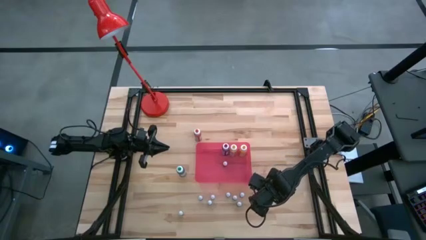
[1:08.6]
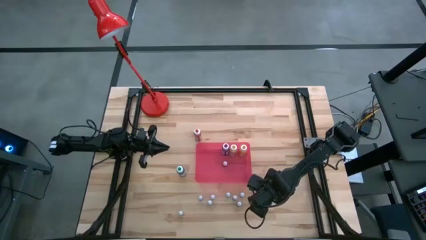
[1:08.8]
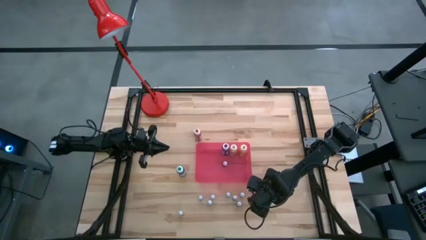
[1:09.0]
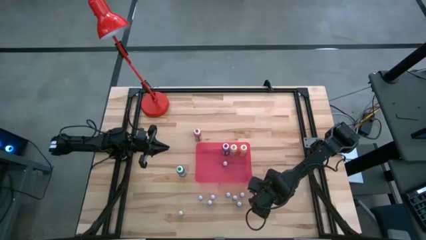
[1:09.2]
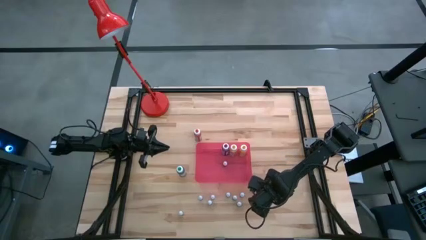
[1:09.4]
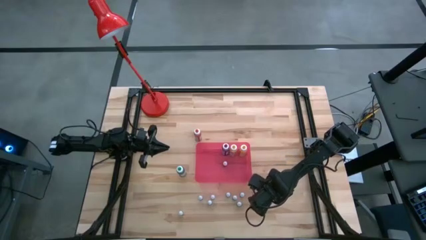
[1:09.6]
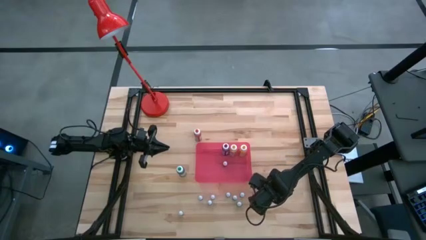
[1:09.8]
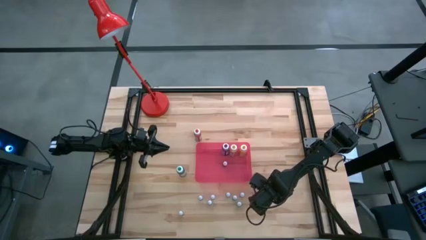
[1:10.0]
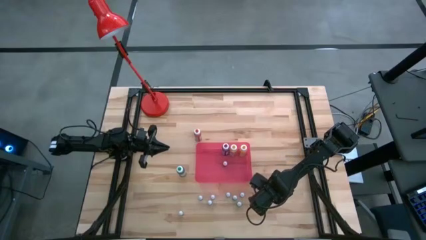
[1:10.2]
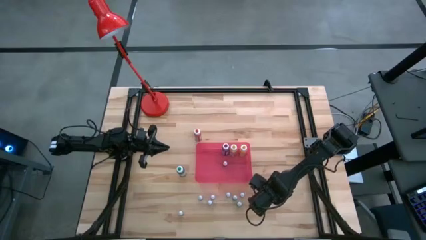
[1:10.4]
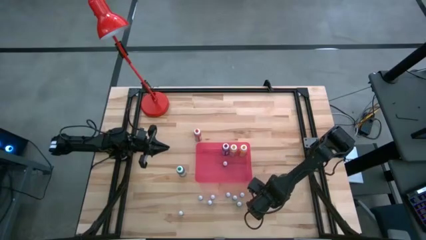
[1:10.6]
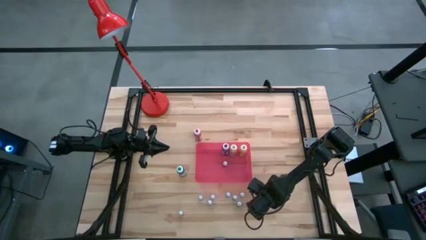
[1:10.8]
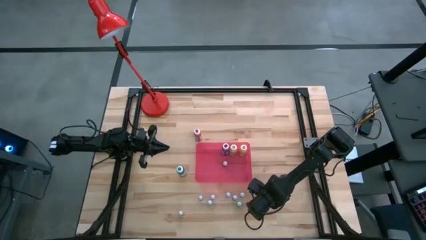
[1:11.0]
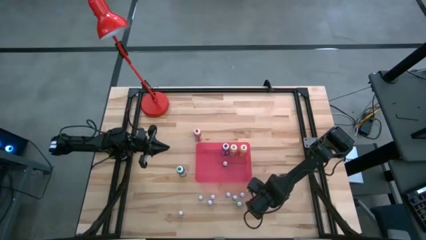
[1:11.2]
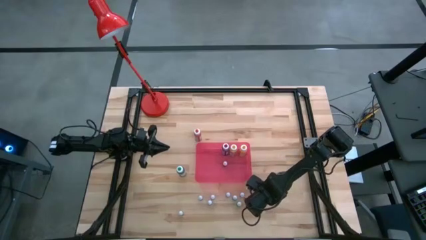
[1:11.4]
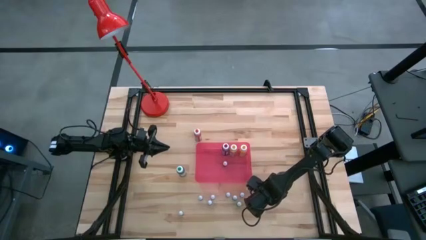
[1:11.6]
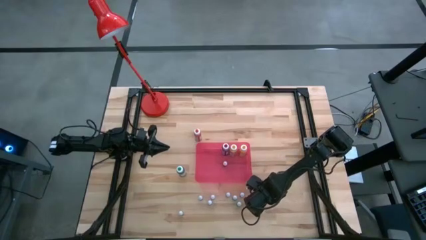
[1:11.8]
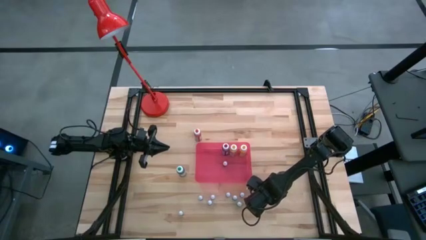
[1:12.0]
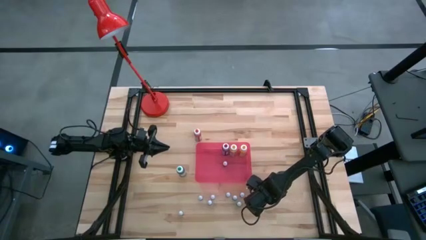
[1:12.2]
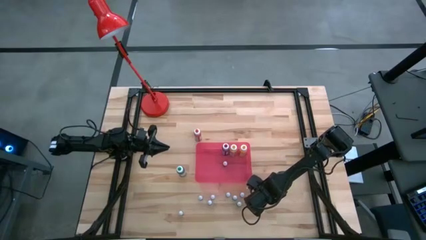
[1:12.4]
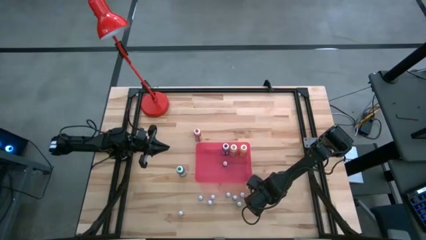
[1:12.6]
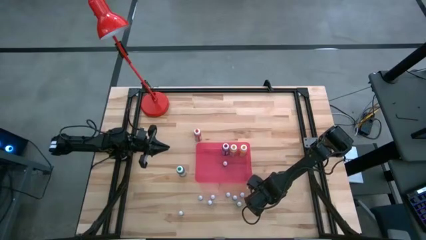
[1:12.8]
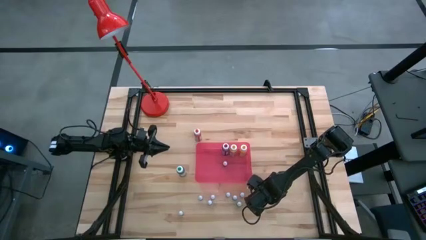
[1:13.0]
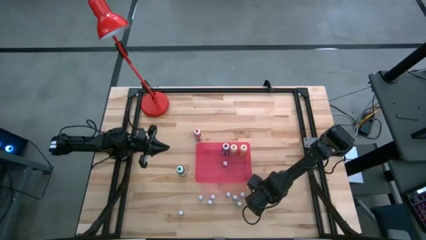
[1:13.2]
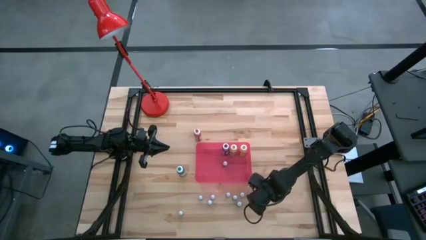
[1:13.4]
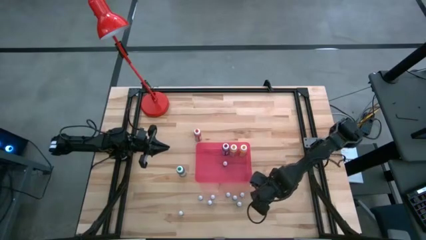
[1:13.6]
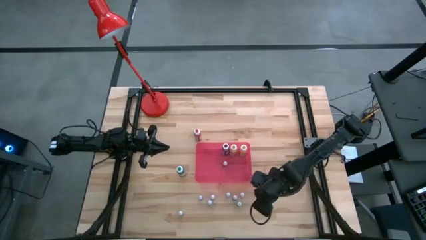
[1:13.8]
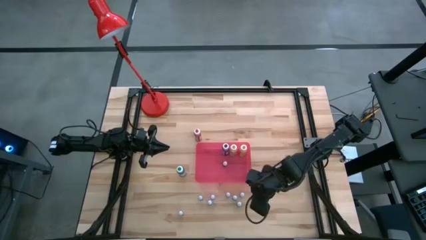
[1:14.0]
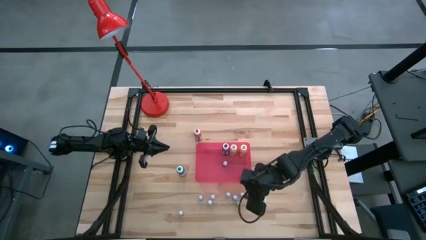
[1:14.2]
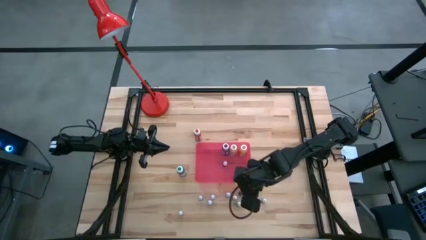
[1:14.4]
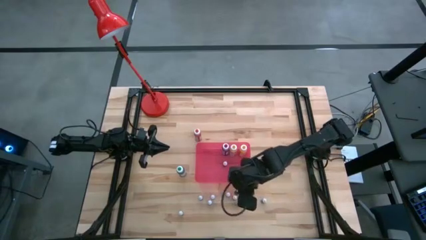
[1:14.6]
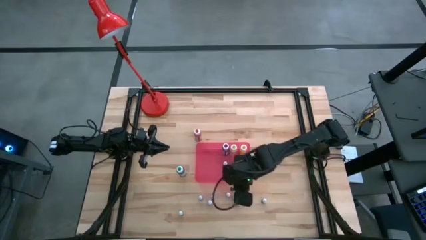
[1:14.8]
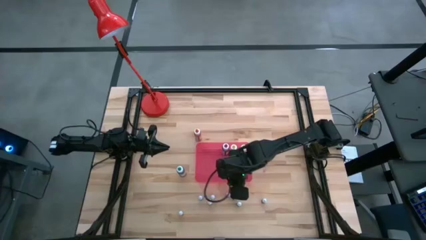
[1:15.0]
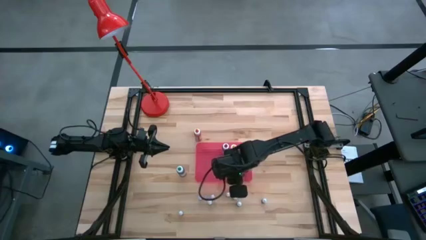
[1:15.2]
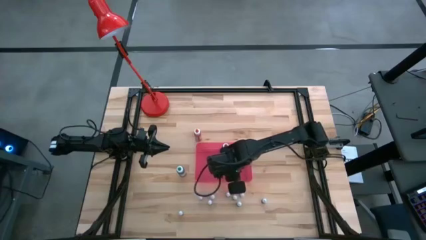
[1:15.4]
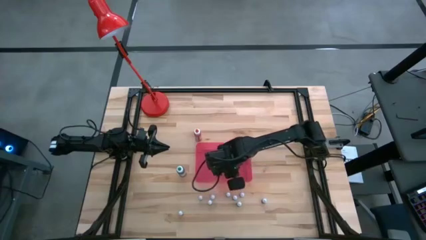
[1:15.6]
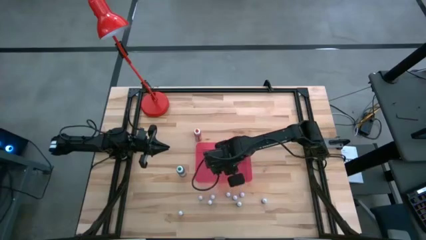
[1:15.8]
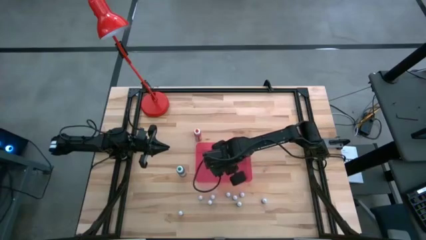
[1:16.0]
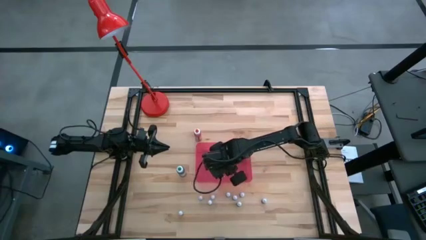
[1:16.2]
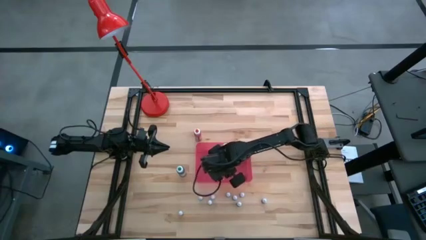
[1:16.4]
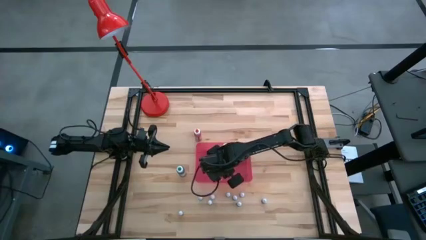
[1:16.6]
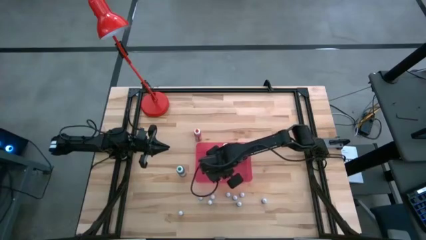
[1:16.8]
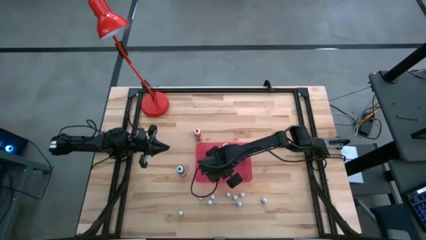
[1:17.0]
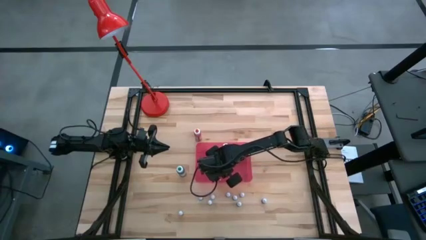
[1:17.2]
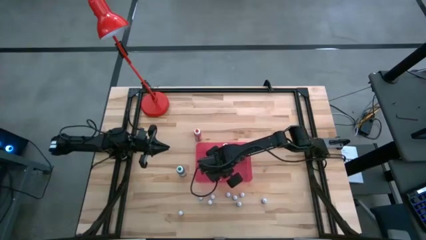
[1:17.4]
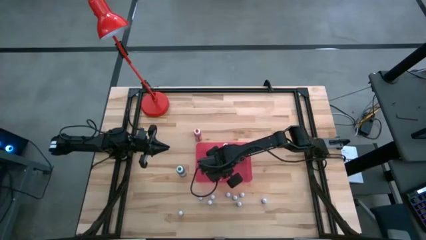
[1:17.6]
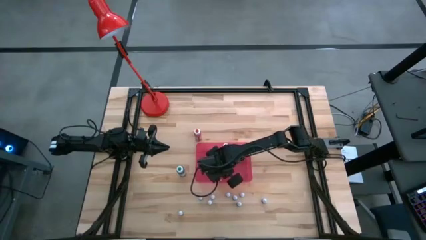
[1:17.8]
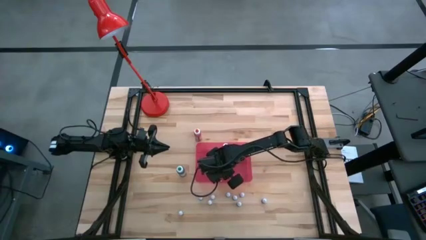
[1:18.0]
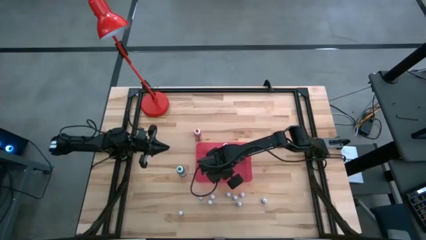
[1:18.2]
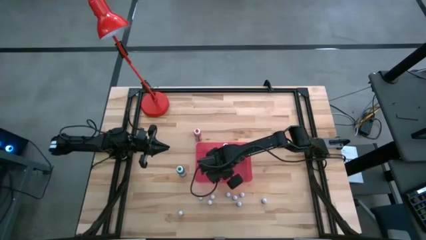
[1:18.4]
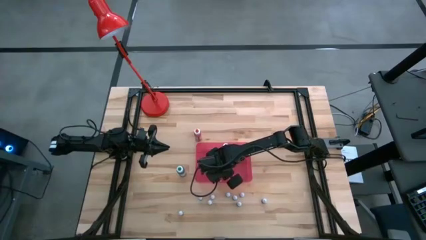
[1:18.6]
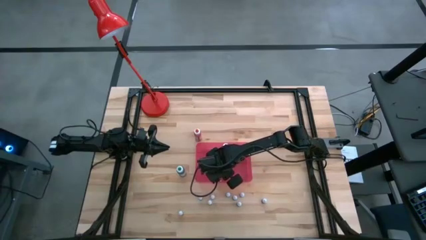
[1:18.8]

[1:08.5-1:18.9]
Task: Pick & Place food coloring
Put the small green food coloring bottle into the container

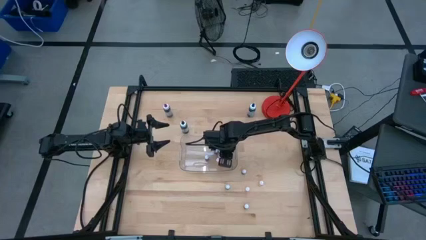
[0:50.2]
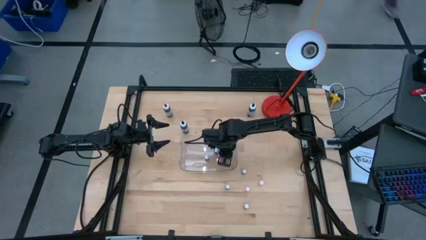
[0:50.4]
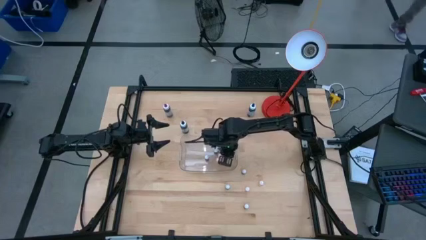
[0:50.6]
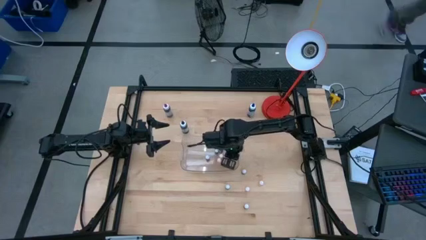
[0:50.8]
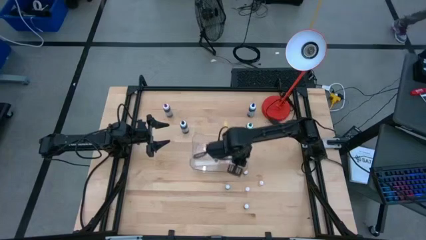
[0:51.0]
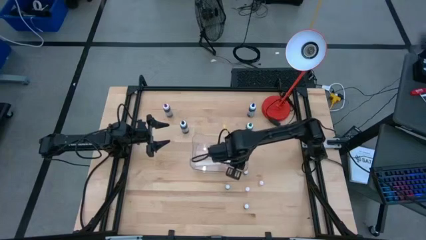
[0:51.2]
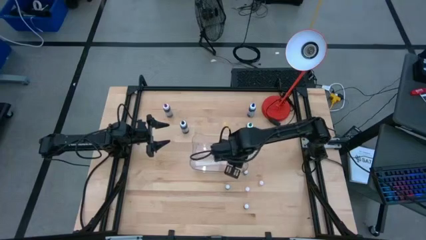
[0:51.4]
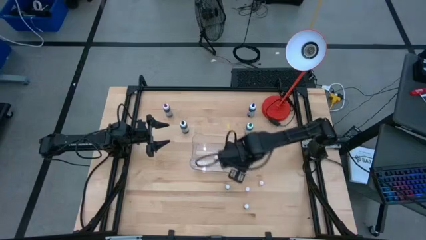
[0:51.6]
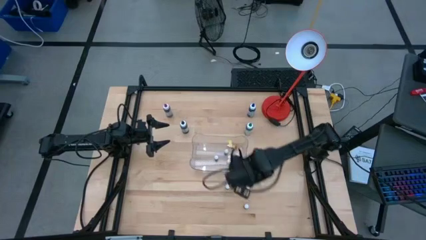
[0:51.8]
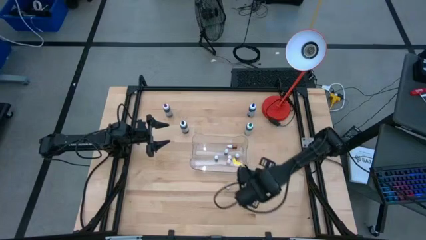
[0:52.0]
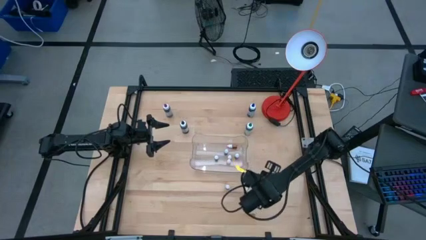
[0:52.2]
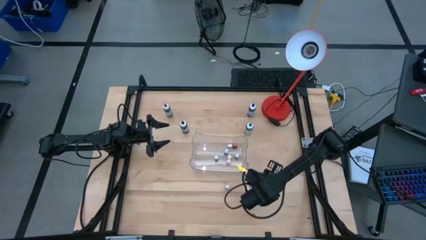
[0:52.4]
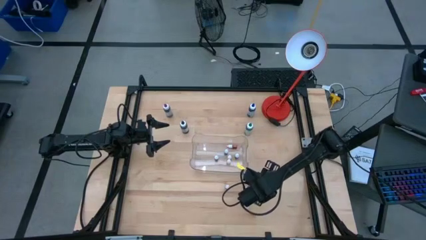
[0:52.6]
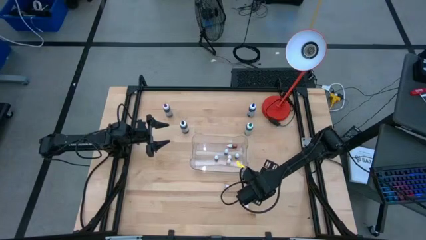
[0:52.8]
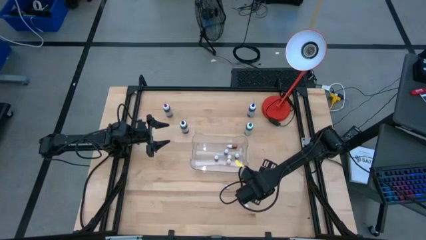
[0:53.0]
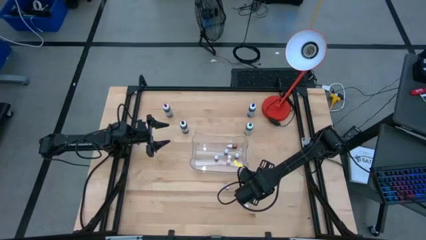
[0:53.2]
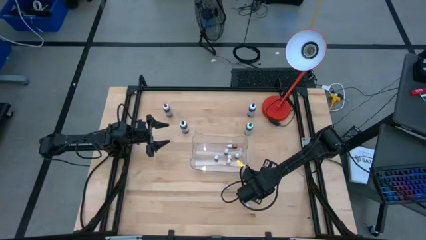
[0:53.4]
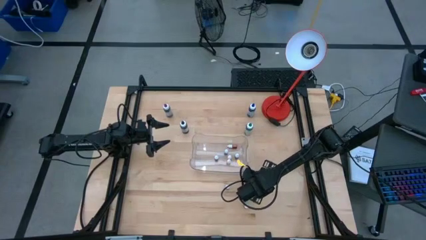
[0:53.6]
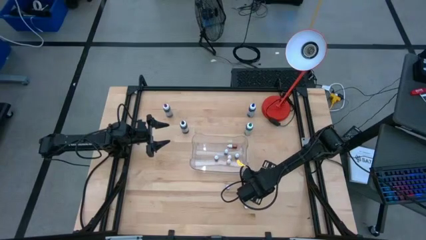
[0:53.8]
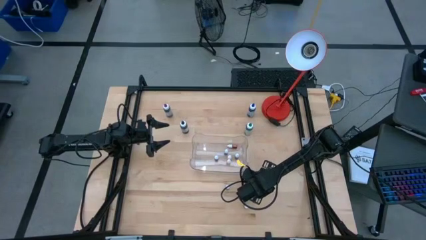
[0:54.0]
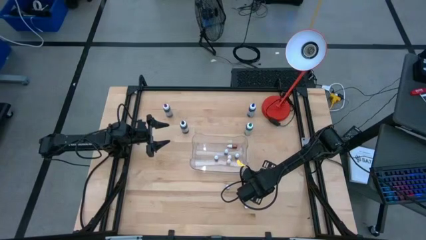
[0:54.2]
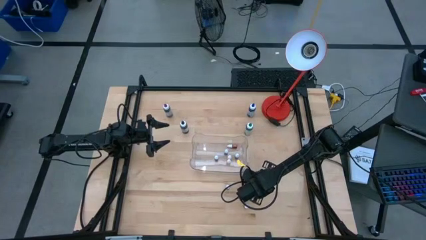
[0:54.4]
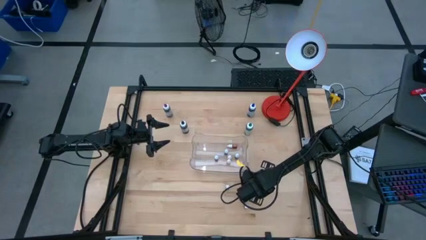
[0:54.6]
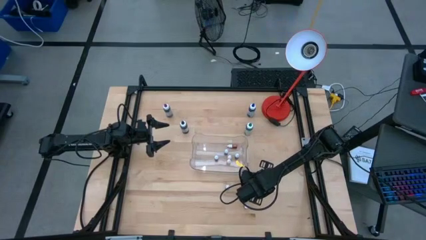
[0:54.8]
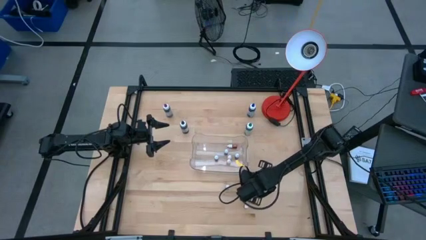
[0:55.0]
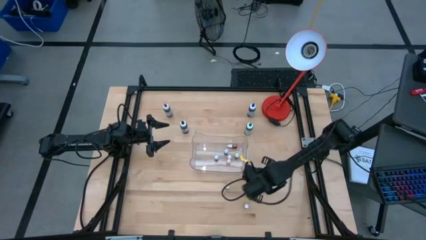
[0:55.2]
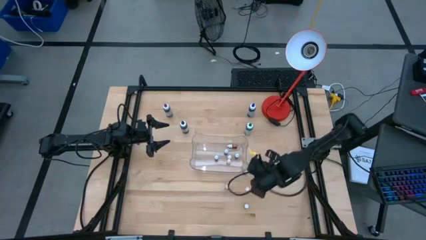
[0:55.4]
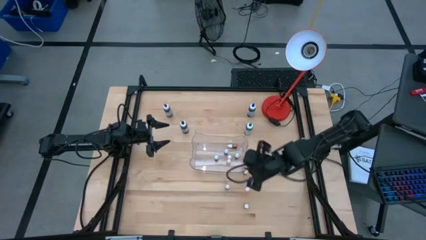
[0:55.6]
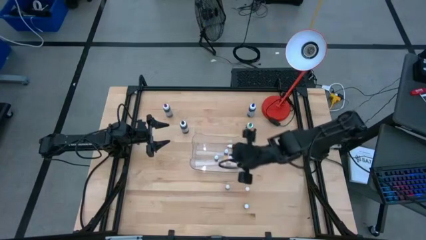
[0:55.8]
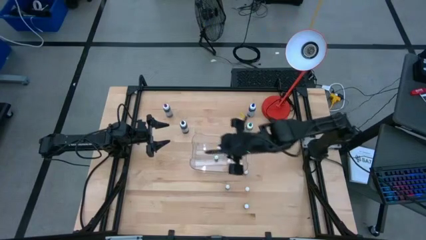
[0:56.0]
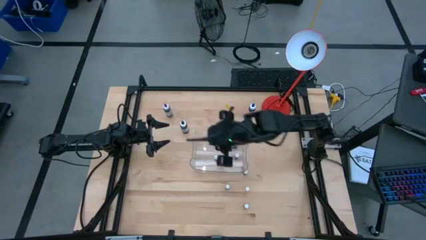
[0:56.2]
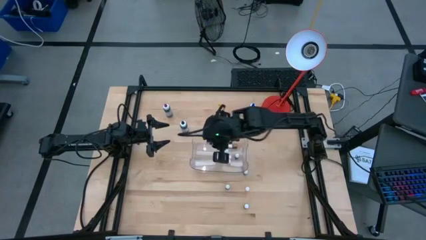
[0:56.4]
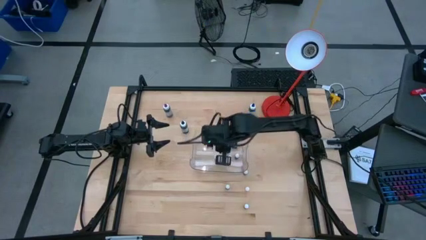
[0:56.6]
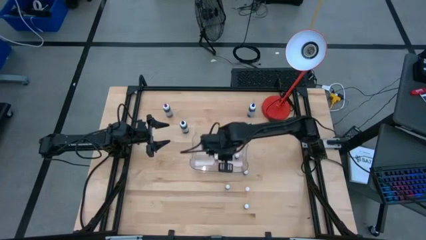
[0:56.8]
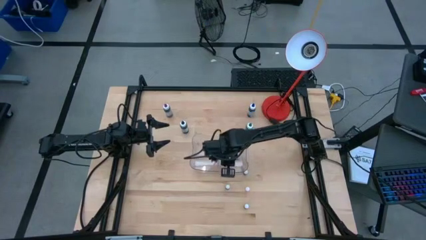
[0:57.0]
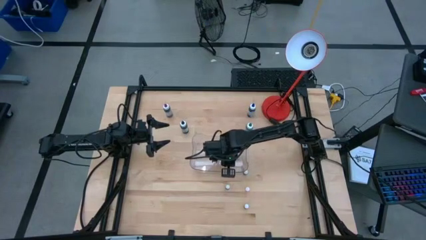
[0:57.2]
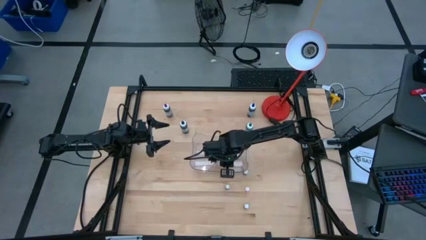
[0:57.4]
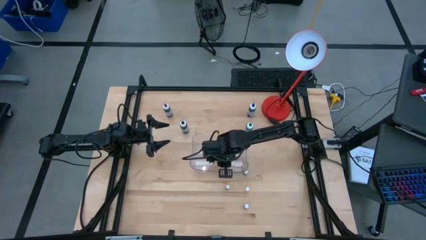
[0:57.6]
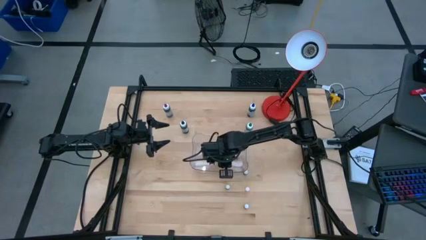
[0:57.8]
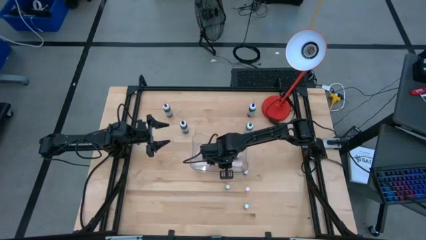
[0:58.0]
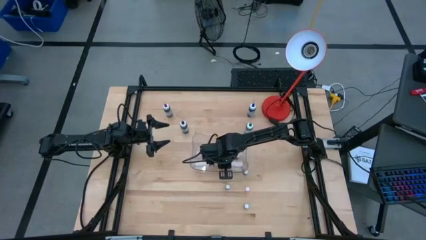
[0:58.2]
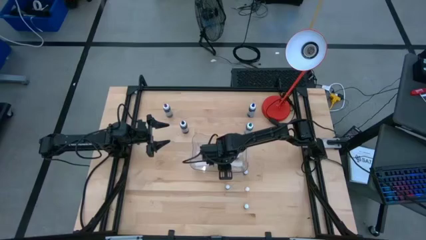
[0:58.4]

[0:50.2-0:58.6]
Task: Pick & Place food coloring
Put the orange food coloring bottle into the transparent bin
